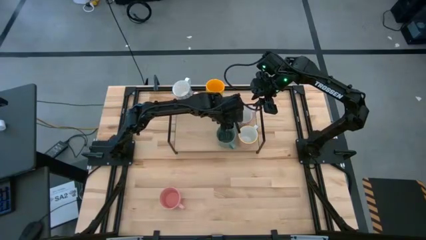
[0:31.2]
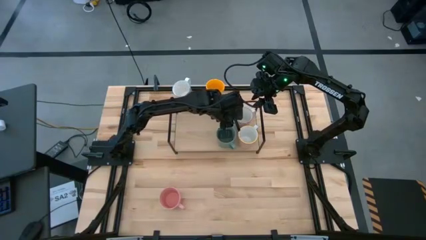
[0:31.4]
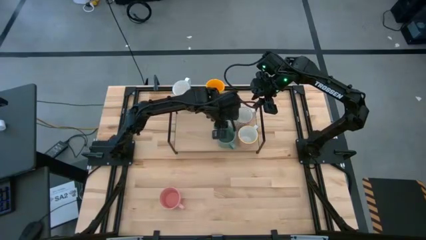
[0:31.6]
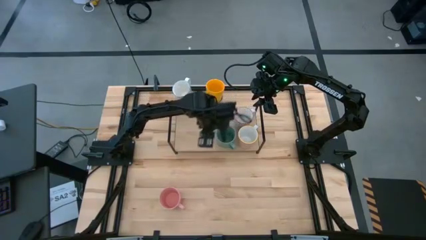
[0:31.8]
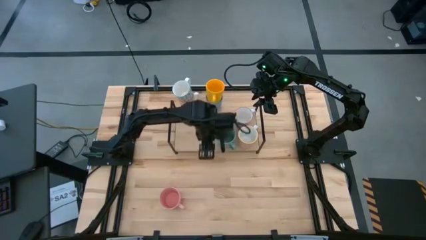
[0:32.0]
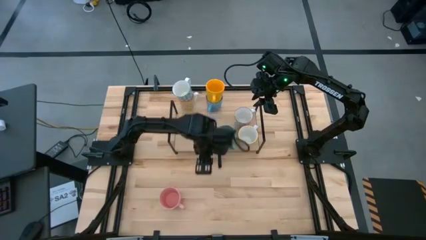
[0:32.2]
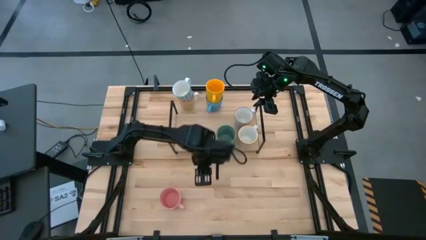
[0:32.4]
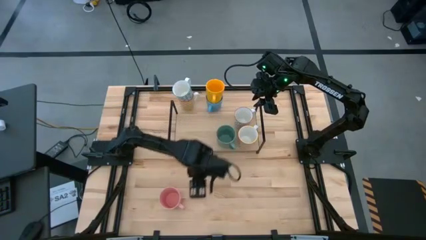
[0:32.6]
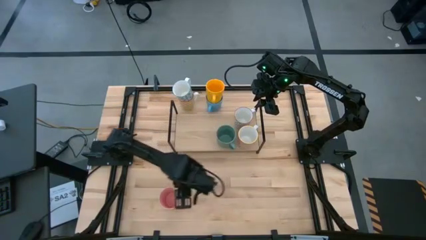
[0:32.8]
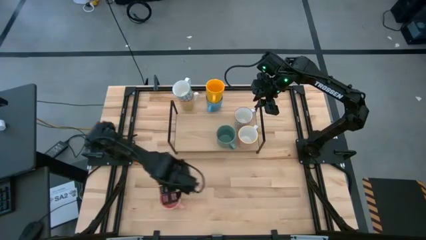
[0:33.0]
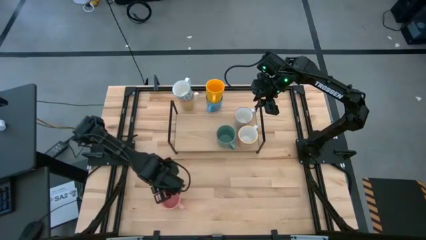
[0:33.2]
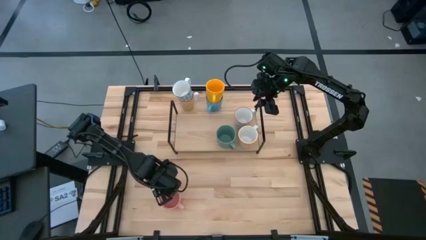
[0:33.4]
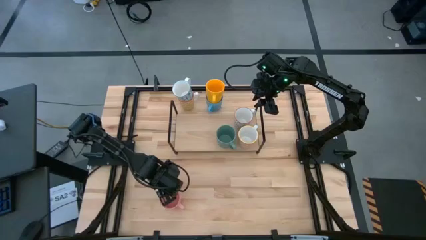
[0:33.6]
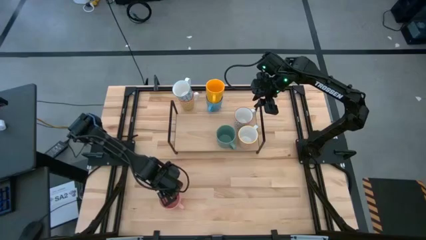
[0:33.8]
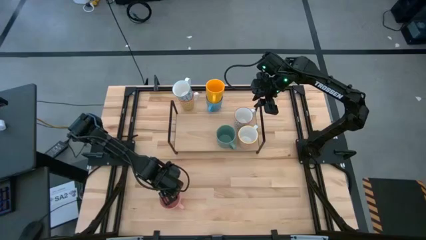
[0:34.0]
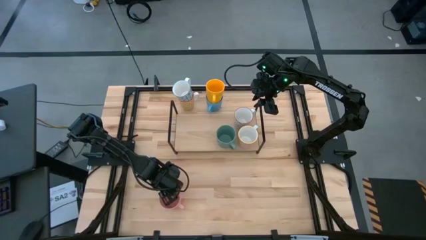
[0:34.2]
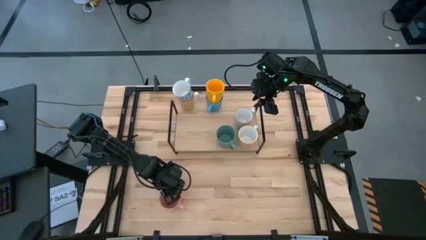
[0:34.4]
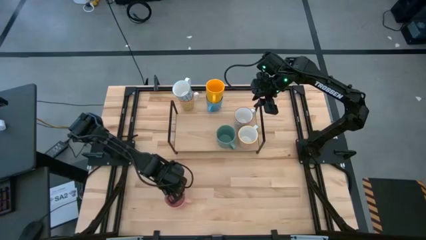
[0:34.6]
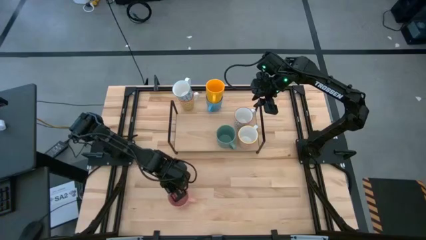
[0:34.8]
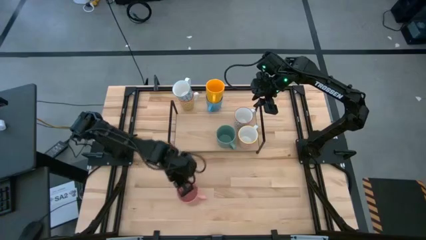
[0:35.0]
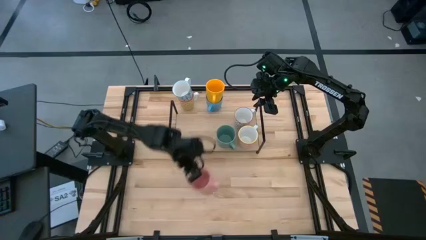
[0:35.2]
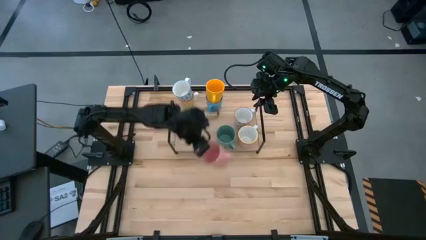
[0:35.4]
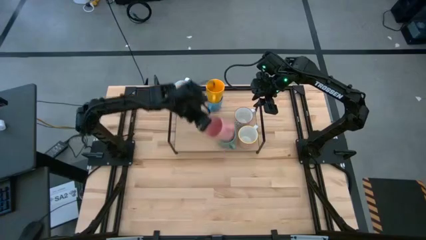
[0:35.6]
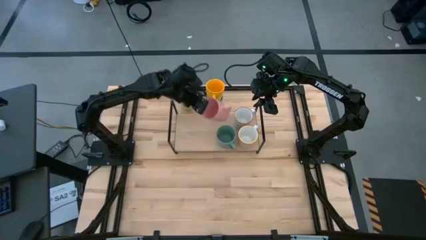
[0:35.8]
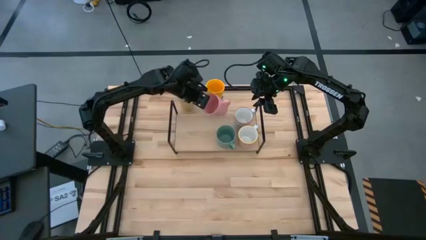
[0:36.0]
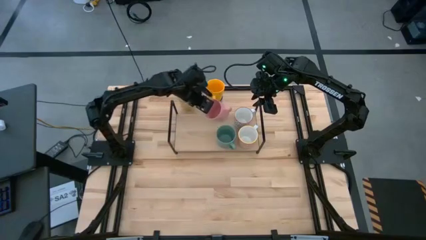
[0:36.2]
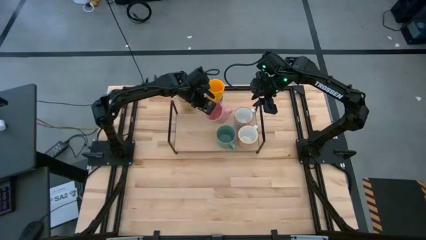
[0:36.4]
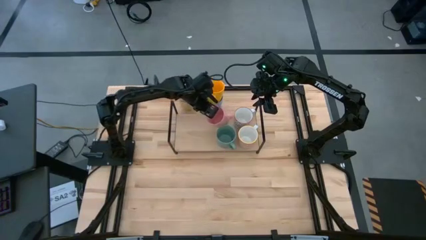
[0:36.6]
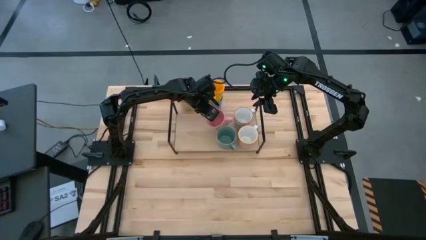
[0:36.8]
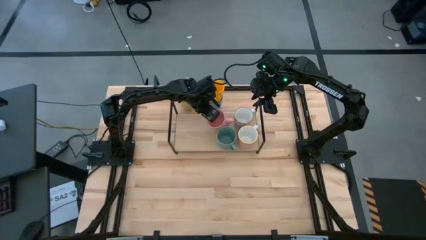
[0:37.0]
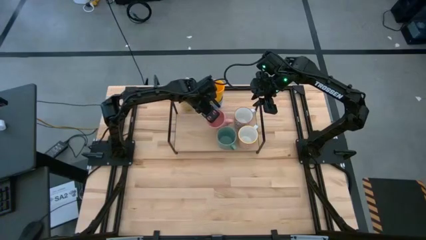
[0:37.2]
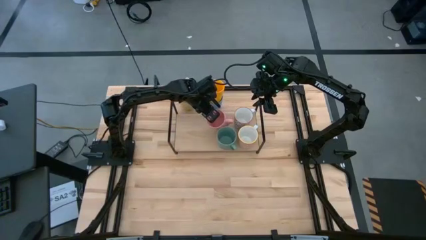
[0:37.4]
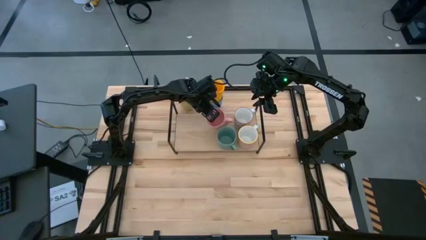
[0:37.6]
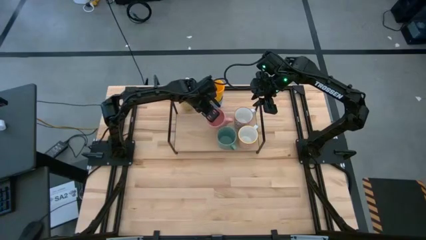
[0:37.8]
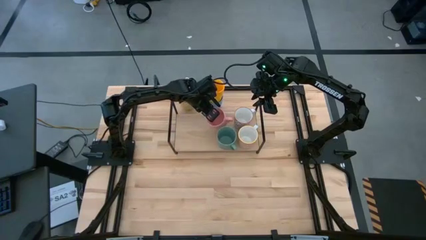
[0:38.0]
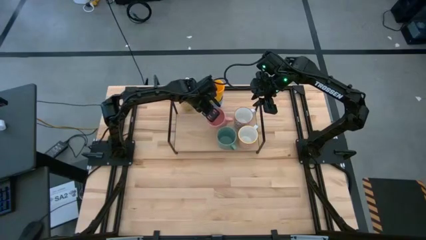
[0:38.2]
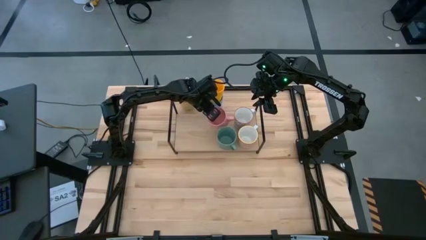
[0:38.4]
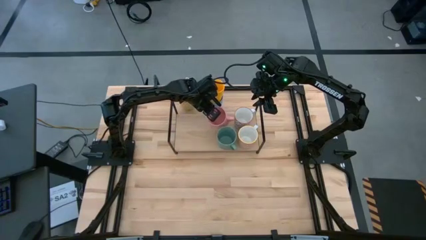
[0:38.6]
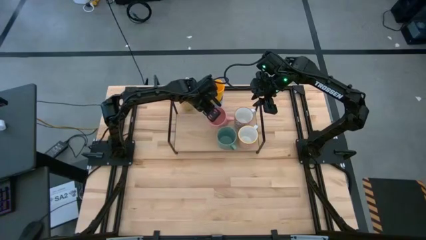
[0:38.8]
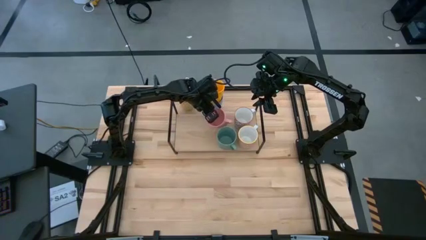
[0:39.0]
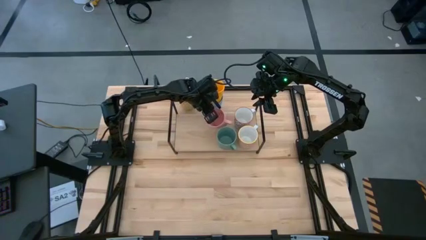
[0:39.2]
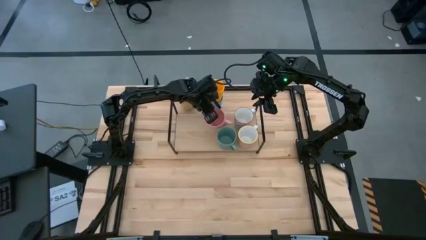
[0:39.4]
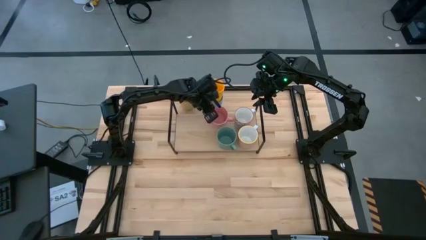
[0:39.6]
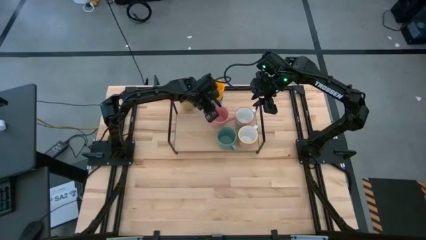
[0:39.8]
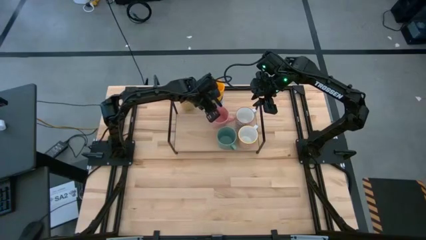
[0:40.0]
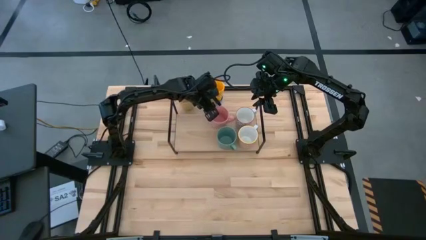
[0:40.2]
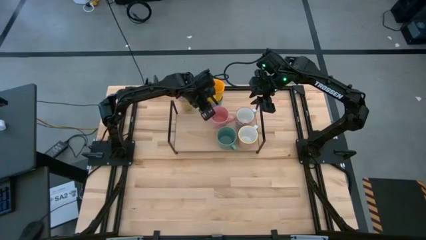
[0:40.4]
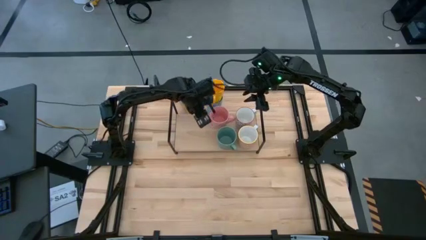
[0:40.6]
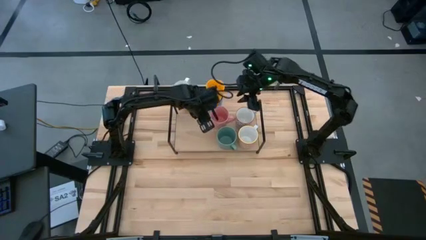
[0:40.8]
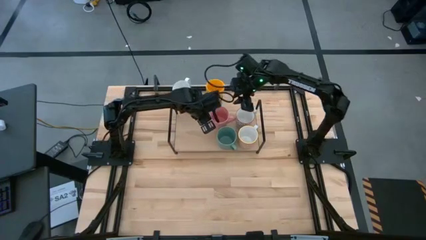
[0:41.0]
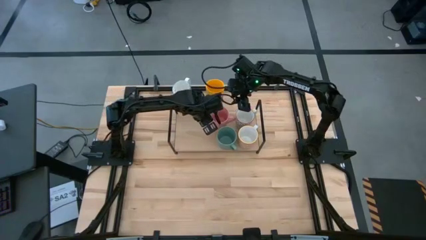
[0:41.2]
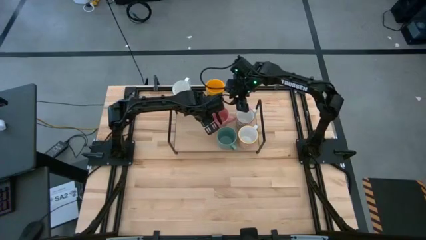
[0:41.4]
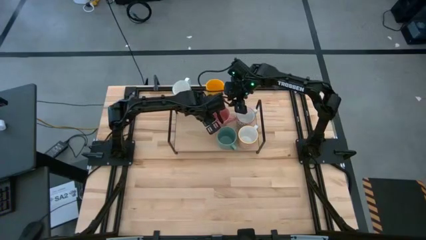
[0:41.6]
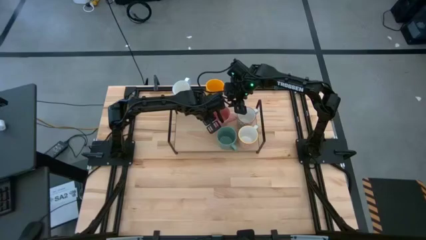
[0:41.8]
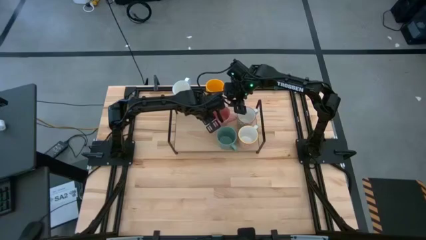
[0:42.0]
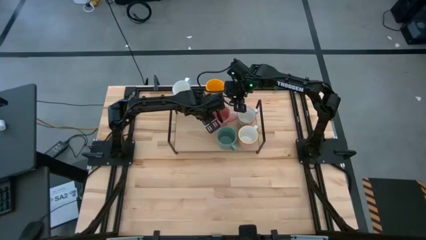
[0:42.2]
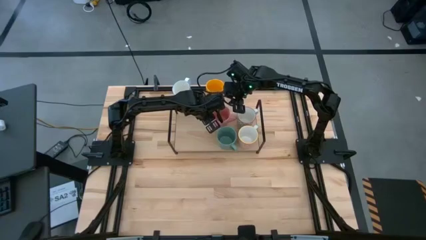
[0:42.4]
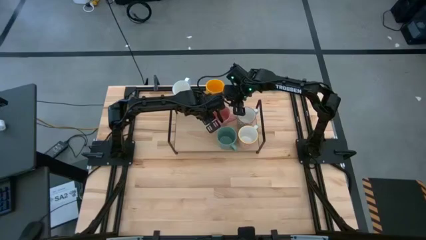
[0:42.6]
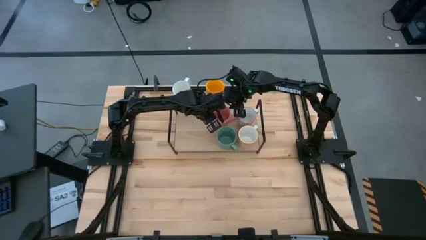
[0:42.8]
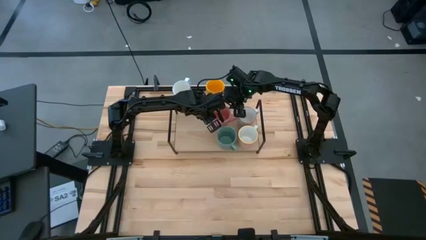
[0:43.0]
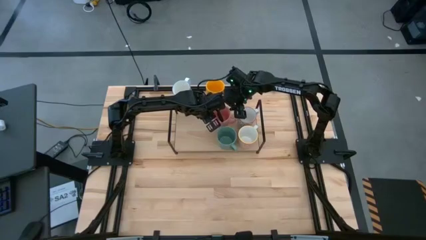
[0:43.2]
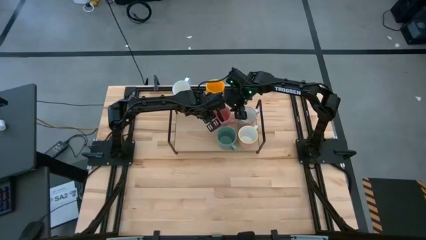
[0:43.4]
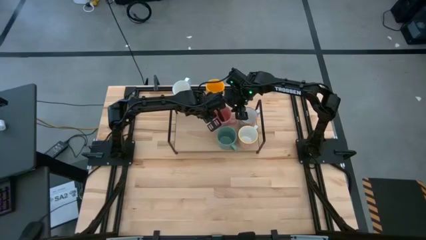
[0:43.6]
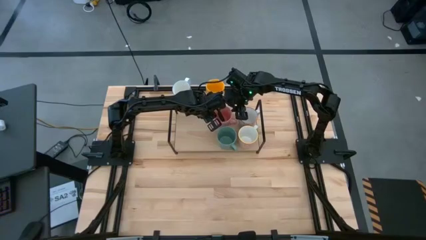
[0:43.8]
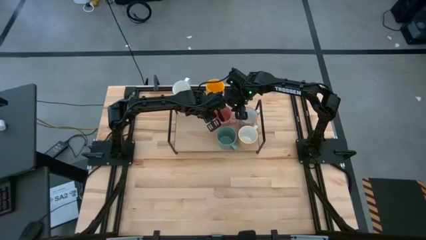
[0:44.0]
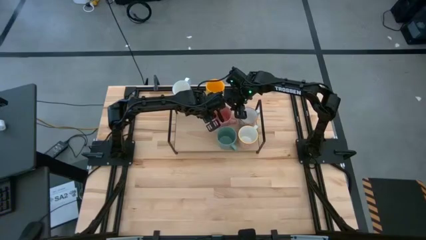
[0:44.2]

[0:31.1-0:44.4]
Task: Place coffee mugs
Put the pink mug on the shelf

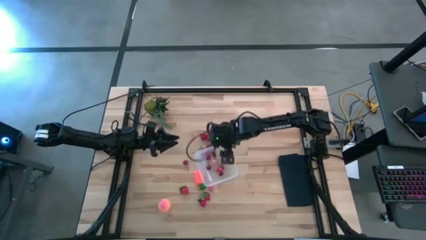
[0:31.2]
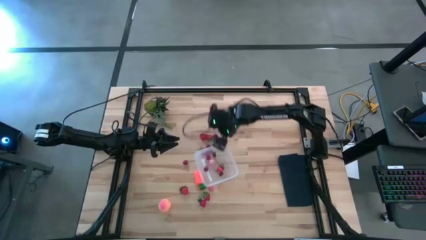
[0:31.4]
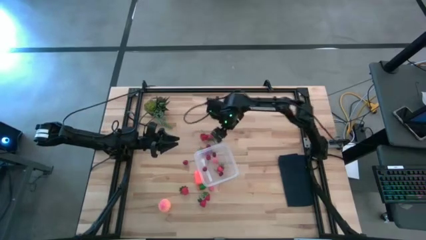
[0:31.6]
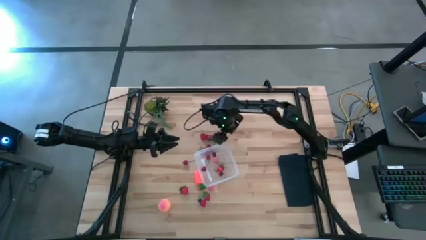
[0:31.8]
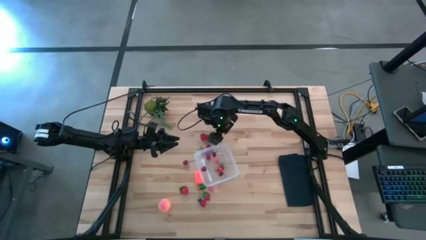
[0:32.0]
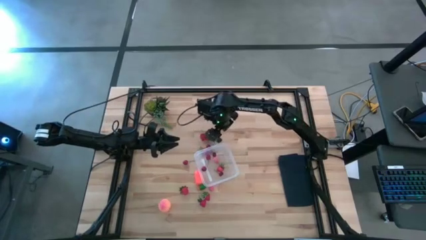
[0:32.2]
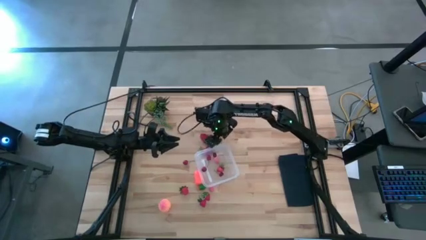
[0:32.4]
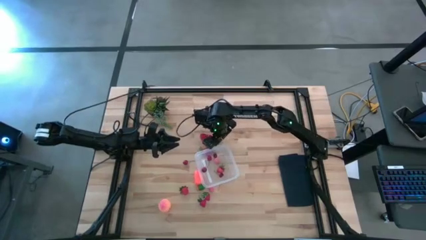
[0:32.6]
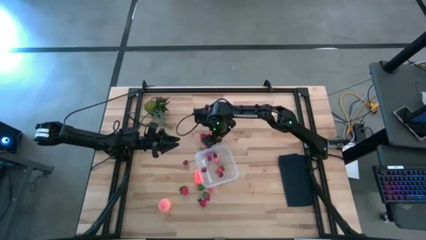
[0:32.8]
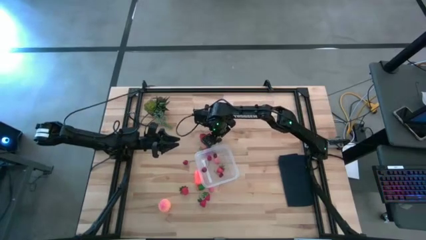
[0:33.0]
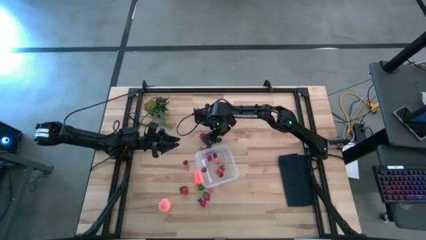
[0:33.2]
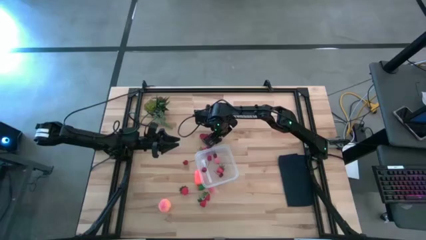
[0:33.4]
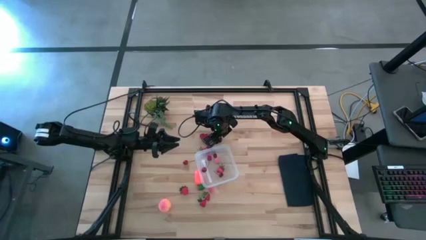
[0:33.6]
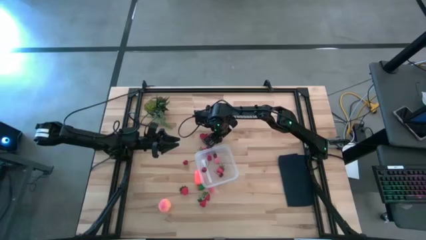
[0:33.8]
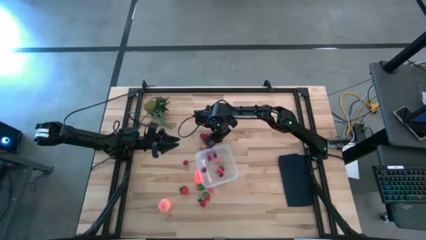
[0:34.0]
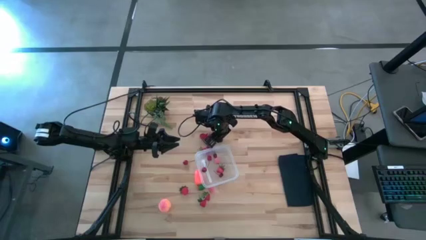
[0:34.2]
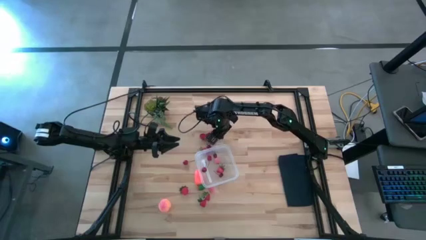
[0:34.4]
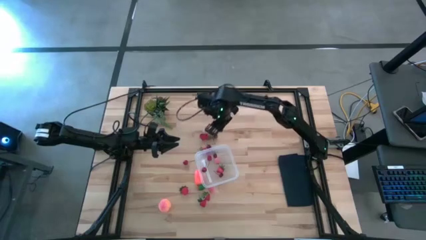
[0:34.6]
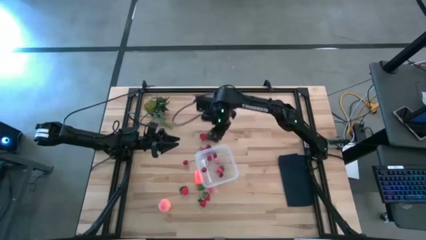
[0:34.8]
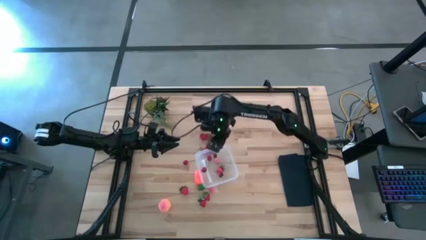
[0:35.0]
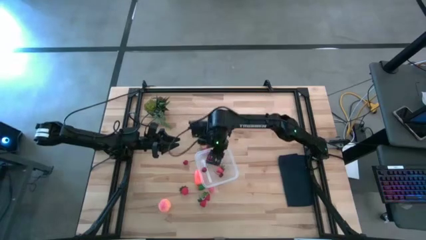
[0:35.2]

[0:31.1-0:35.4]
Task: Pick and placing Produce into tupperware
Put the blackberry into the transparent container
